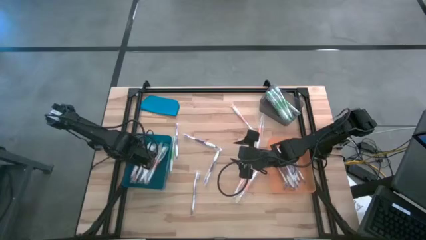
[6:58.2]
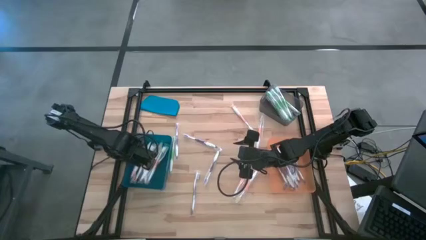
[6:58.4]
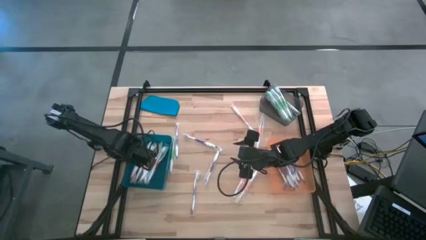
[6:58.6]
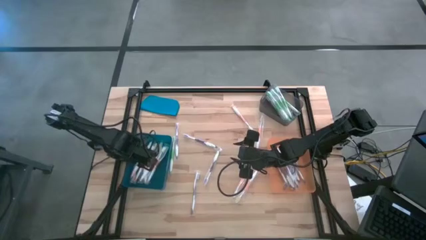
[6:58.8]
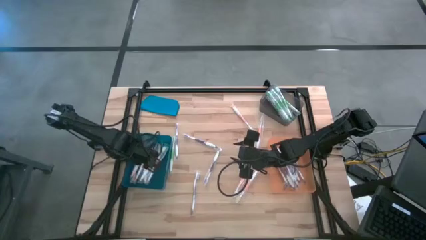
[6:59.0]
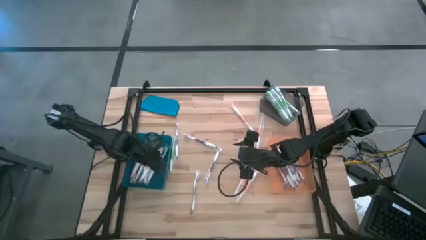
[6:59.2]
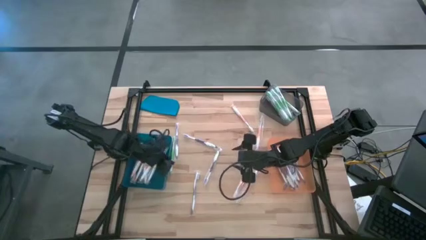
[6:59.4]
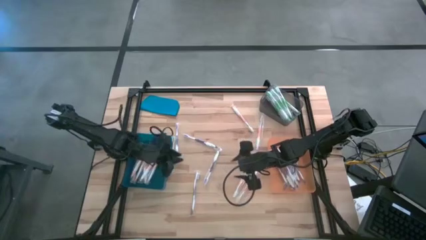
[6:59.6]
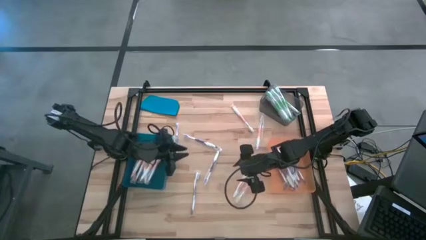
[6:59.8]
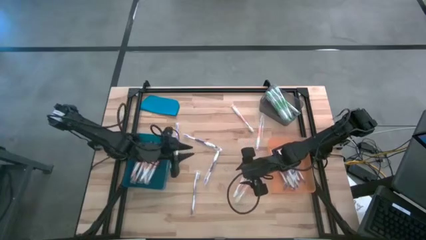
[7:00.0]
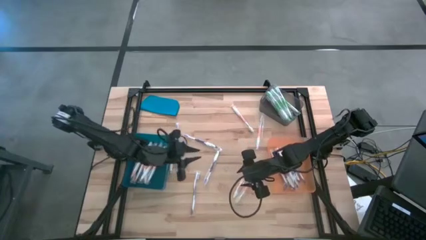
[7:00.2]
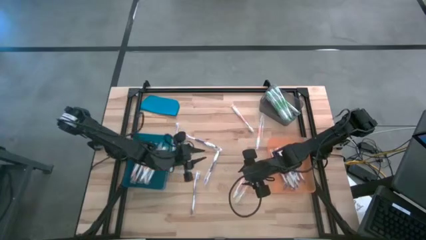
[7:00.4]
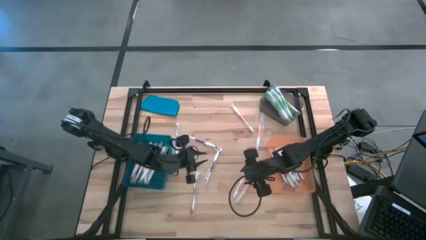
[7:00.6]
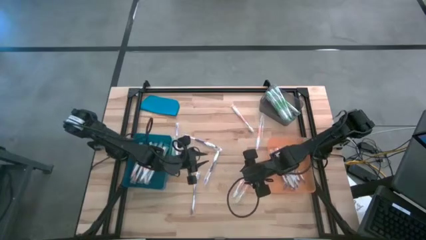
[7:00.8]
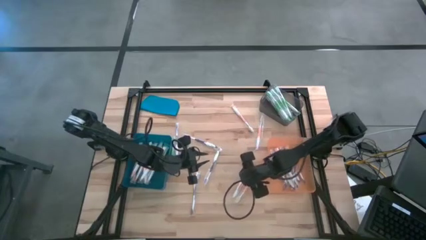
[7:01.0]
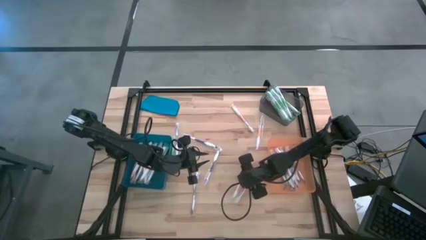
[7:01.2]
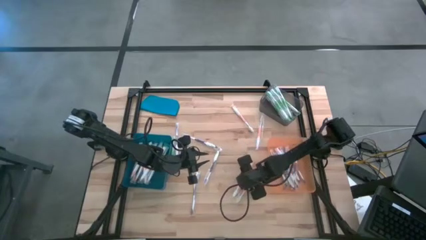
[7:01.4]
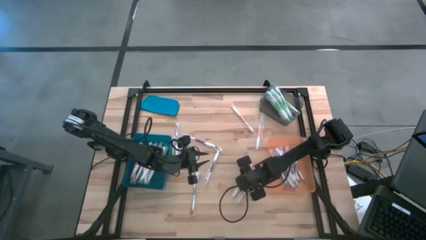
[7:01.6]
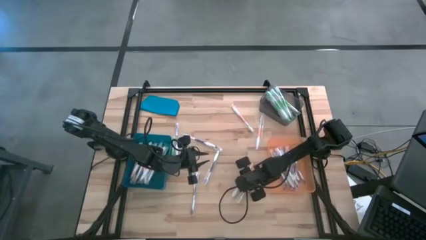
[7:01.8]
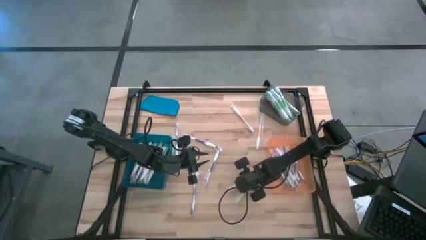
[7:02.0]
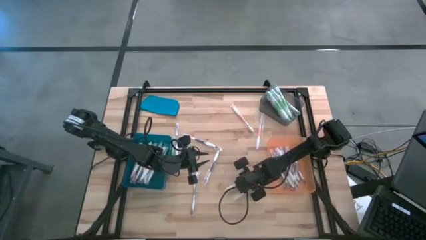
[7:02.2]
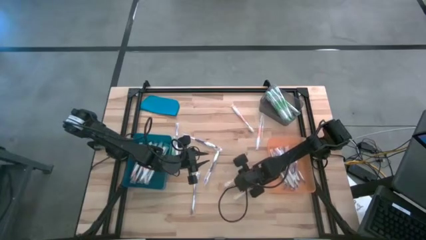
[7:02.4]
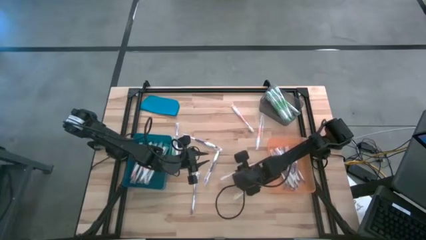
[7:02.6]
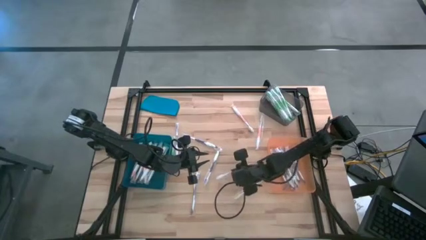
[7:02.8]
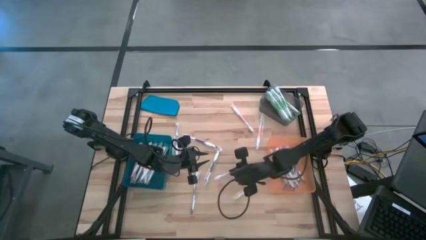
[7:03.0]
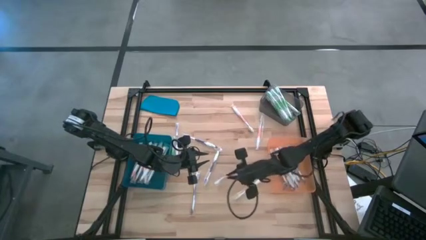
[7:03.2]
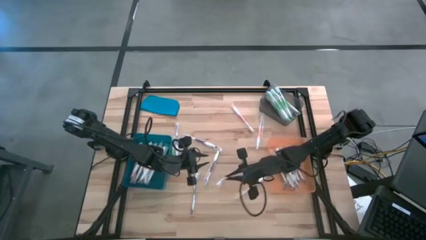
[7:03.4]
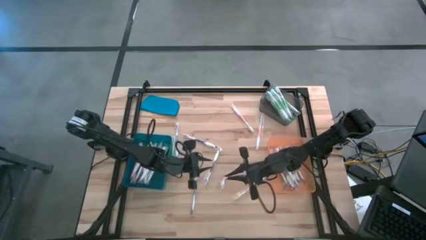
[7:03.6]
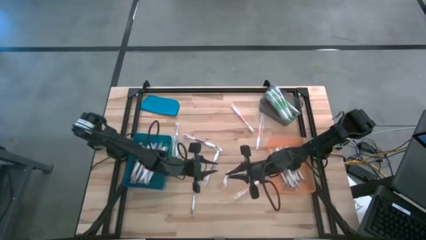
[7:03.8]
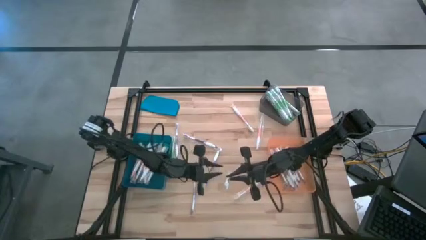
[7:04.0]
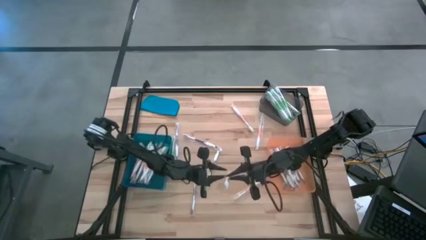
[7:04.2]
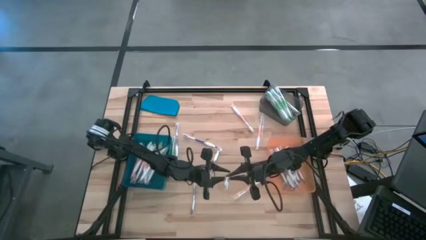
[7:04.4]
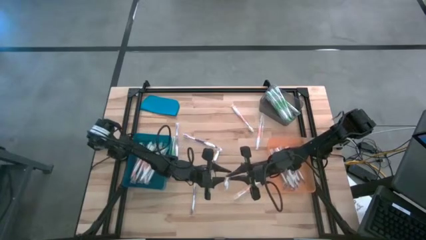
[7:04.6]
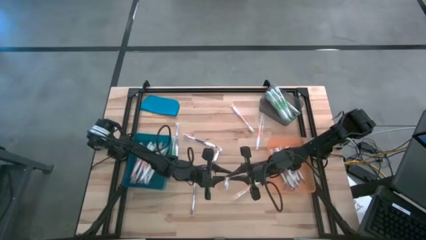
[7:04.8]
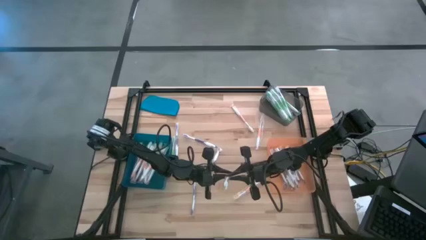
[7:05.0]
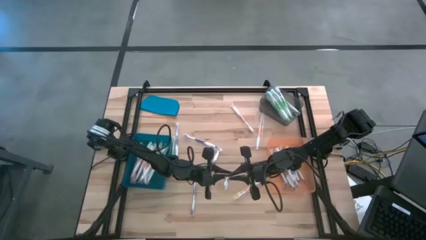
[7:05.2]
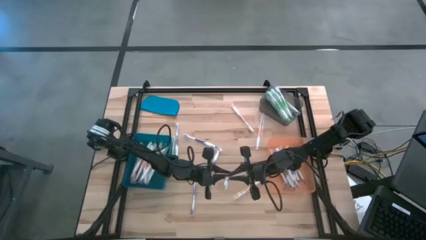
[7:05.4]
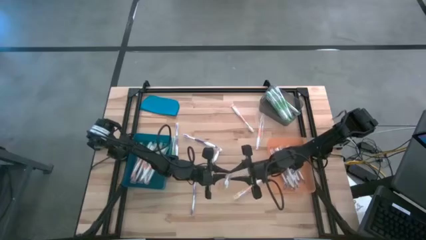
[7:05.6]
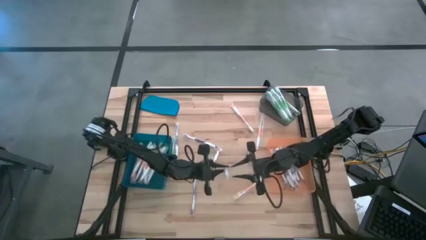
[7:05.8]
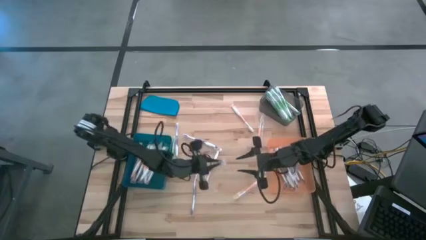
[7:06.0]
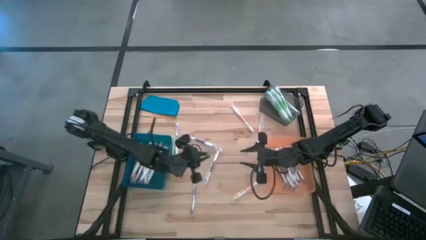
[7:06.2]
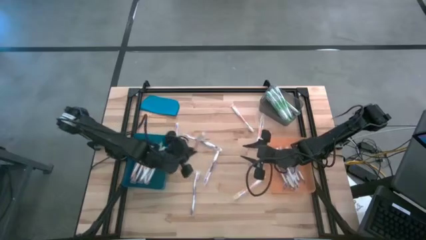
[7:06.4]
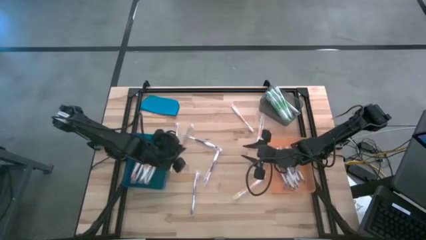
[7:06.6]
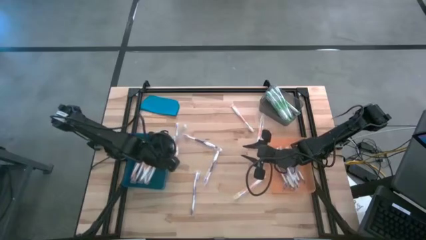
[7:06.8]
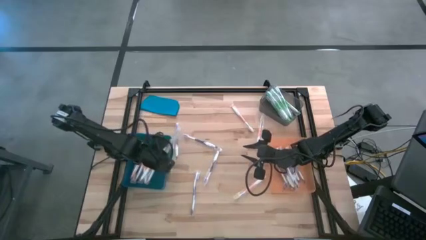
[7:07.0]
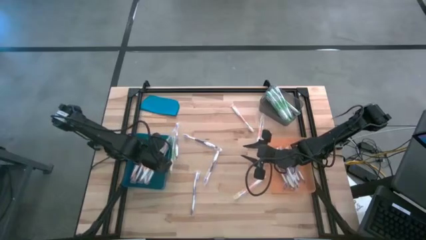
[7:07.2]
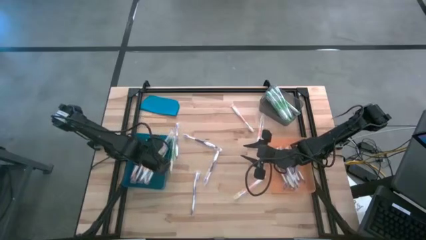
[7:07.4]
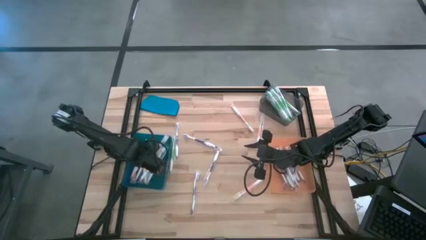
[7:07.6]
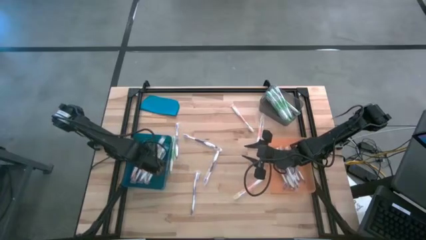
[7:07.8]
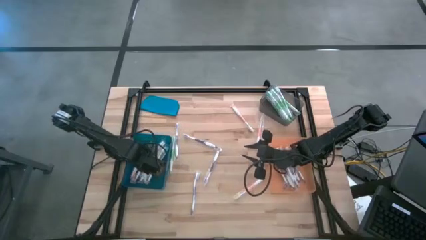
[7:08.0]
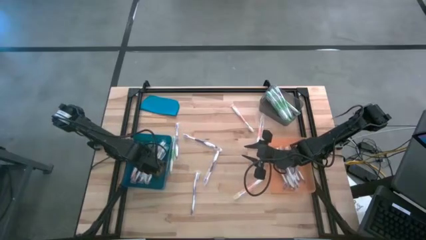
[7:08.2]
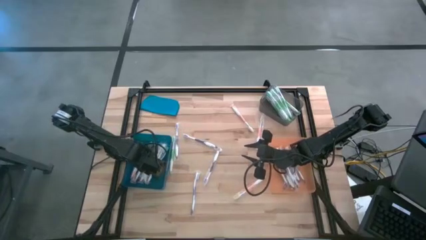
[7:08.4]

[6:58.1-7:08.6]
Task: Pick & Place Toothbrushes
Put the orange toothbrush into the blue bin

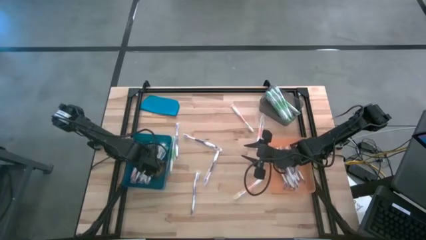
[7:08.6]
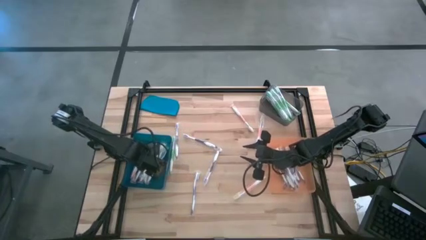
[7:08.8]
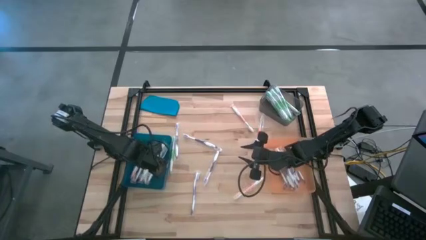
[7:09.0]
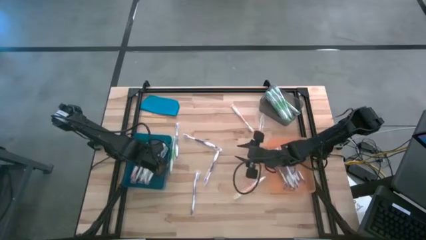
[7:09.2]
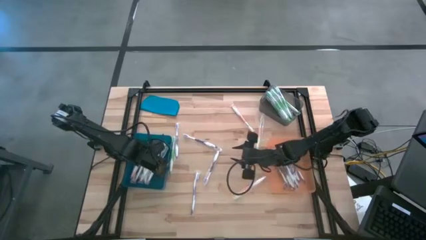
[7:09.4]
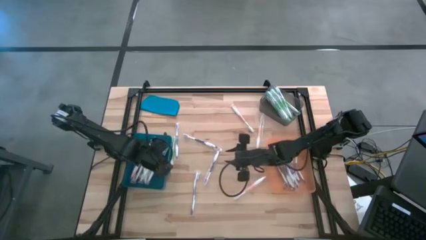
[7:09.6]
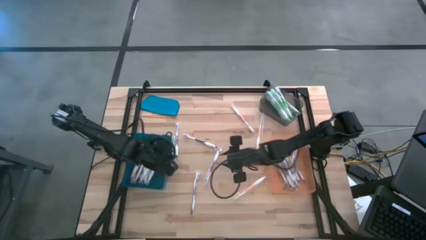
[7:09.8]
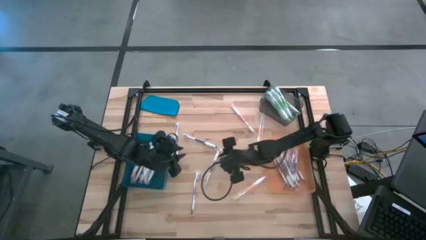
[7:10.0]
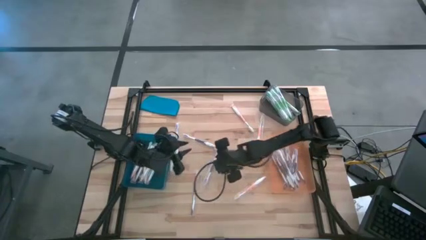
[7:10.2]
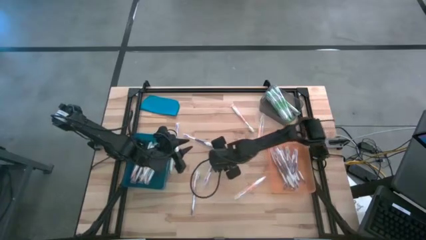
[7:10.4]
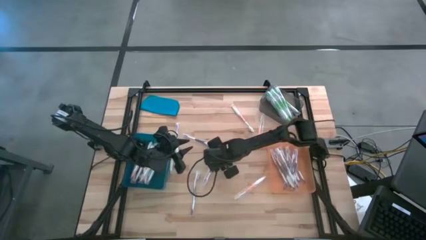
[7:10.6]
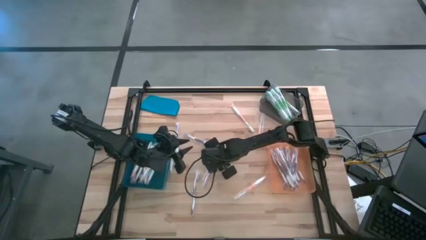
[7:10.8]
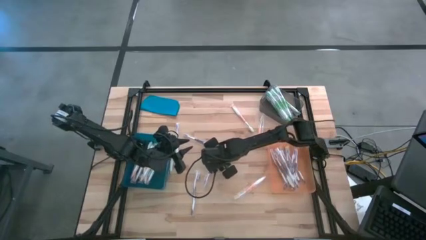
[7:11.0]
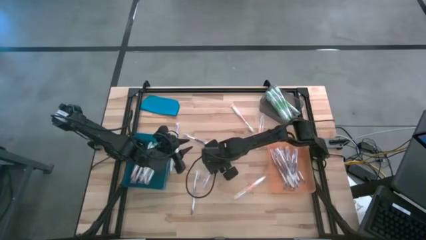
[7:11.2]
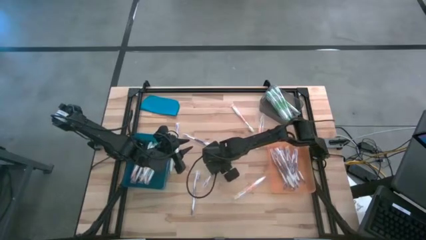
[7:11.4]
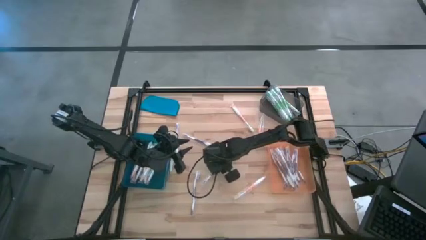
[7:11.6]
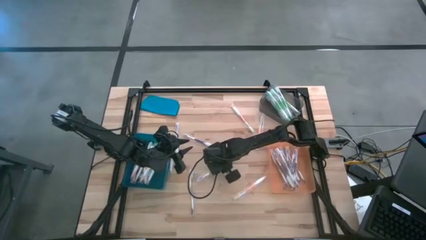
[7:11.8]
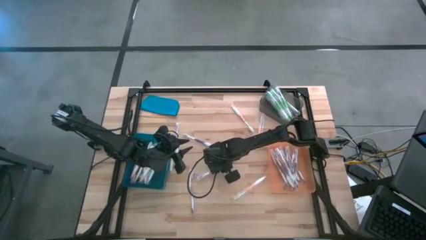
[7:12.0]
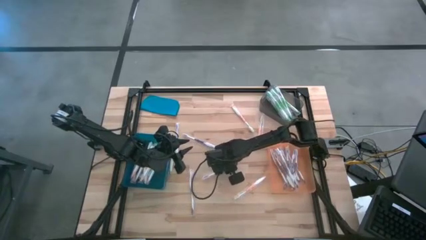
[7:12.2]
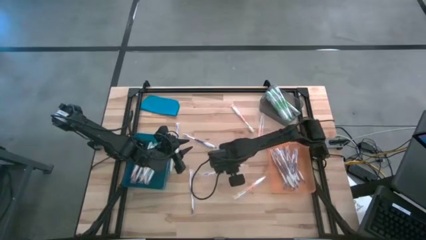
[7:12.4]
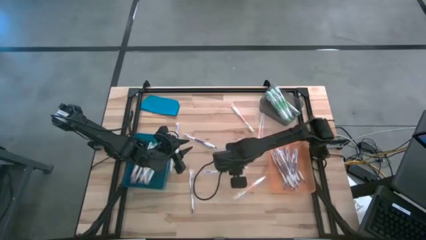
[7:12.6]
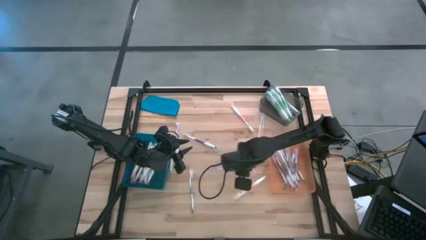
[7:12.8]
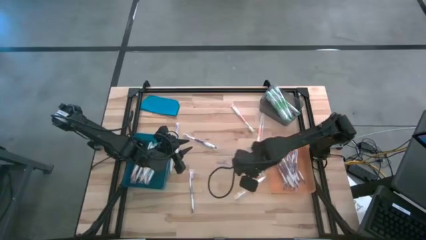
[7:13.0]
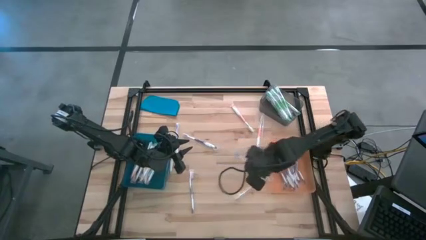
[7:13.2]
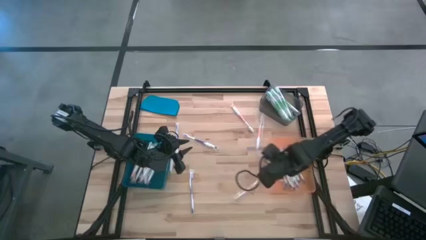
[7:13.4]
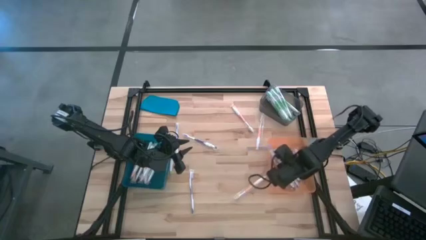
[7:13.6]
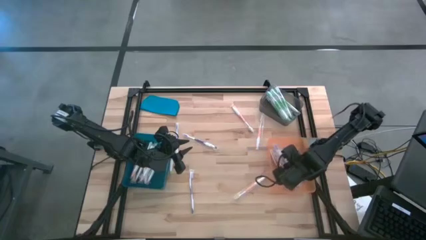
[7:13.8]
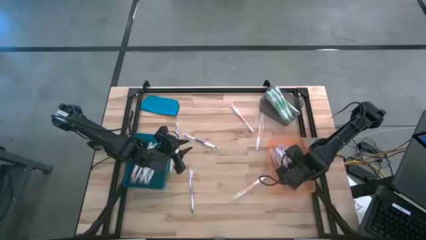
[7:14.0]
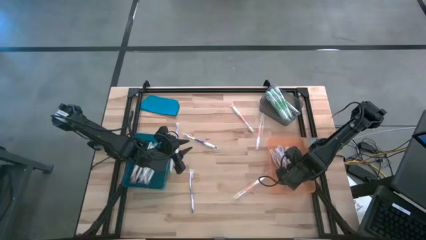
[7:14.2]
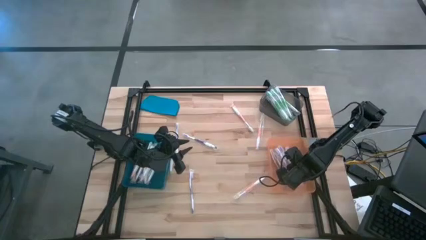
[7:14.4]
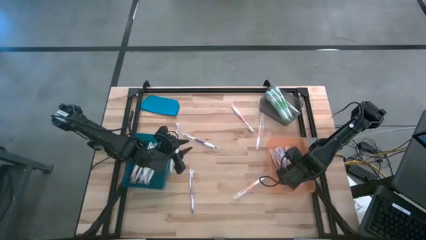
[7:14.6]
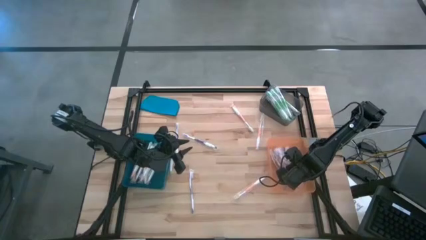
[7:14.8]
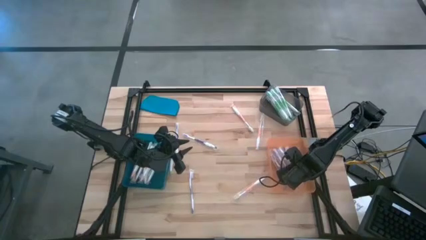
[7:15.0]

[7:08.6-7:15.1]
Put the purple toothbrush into the orange bin
